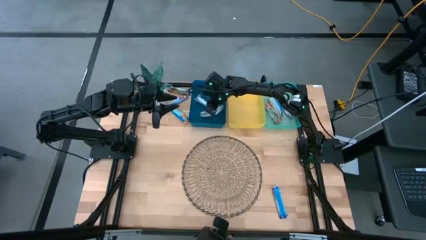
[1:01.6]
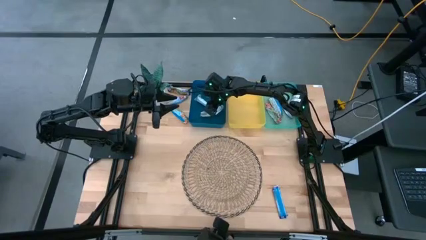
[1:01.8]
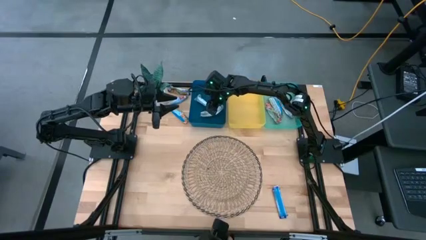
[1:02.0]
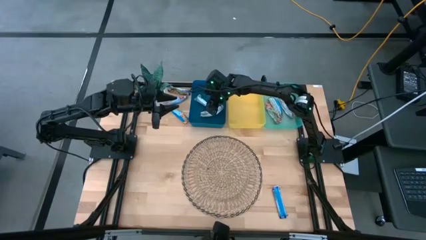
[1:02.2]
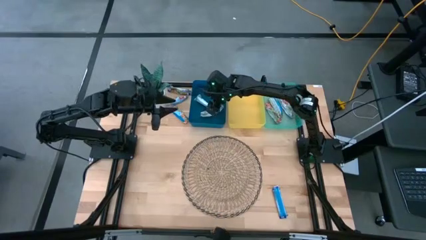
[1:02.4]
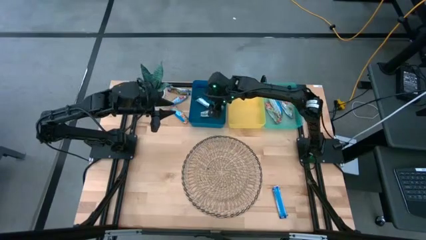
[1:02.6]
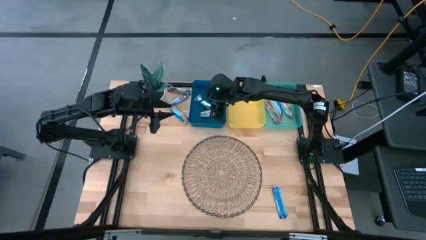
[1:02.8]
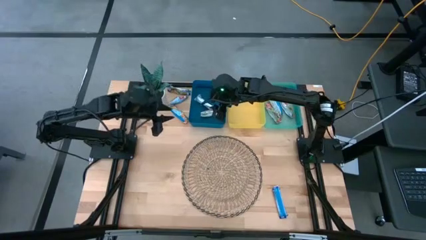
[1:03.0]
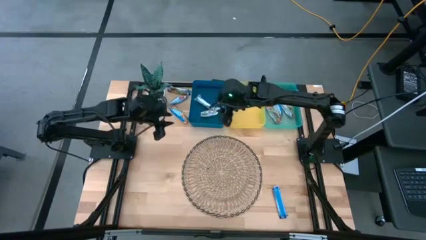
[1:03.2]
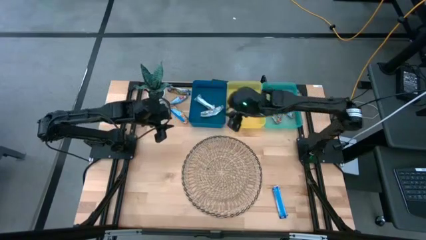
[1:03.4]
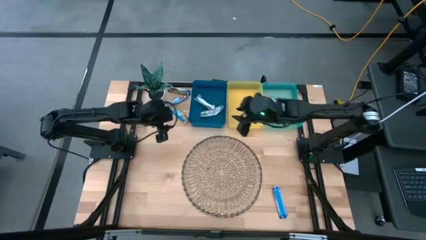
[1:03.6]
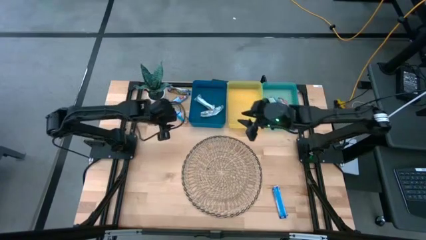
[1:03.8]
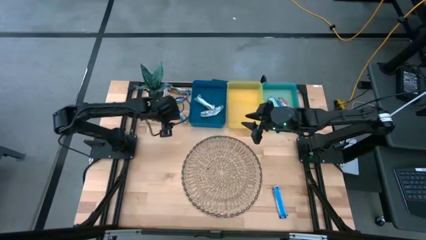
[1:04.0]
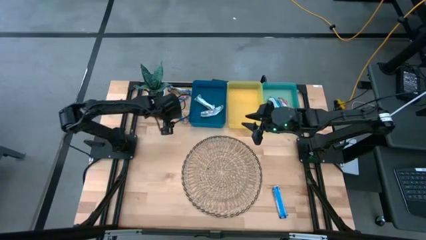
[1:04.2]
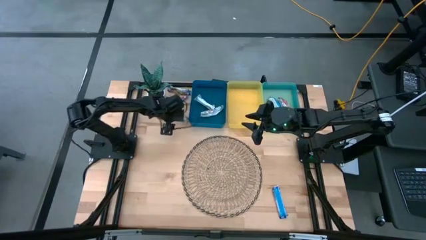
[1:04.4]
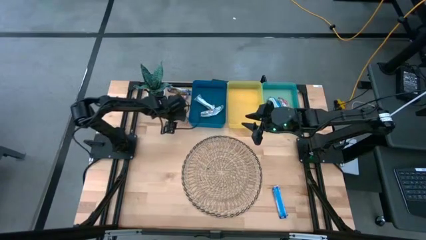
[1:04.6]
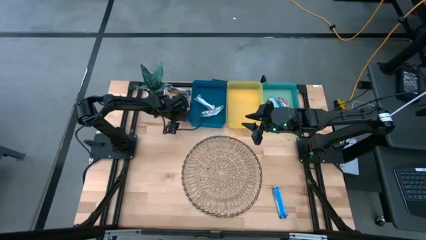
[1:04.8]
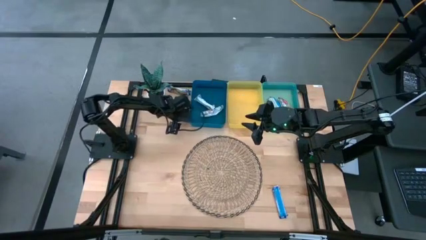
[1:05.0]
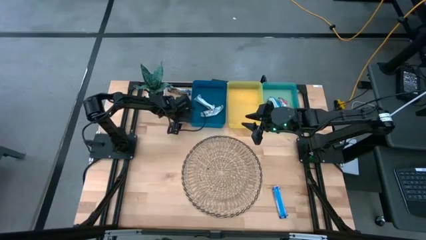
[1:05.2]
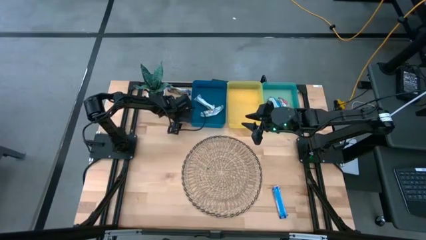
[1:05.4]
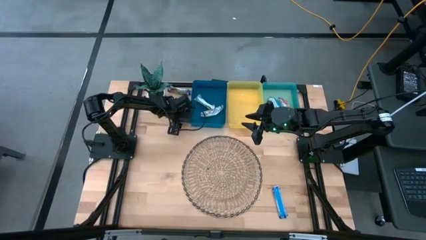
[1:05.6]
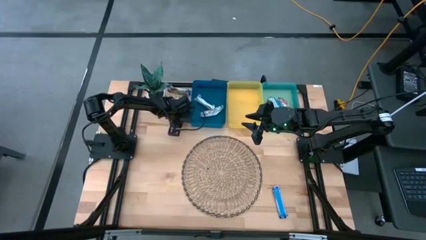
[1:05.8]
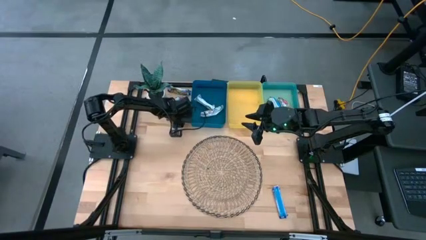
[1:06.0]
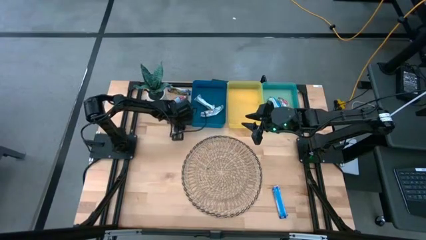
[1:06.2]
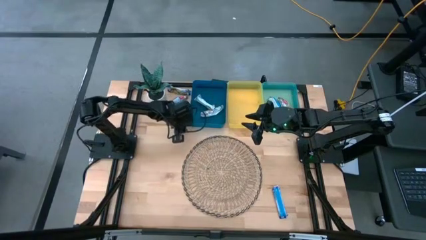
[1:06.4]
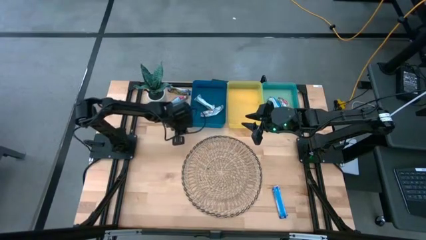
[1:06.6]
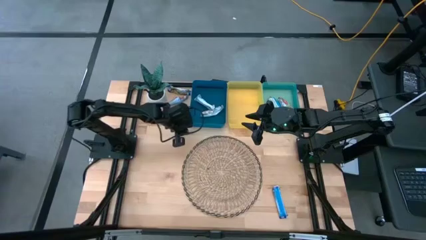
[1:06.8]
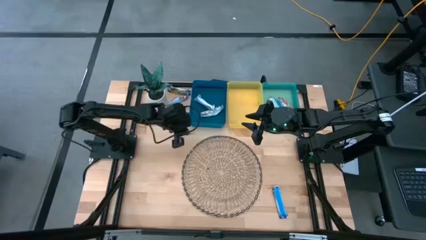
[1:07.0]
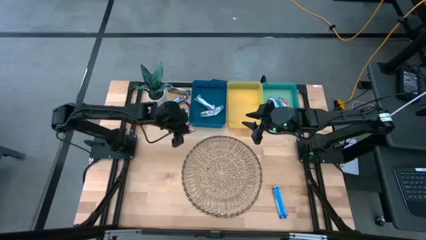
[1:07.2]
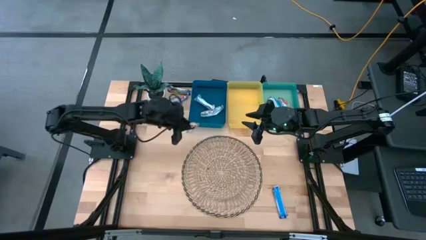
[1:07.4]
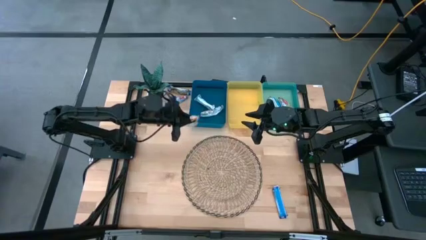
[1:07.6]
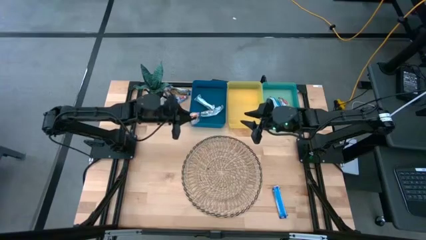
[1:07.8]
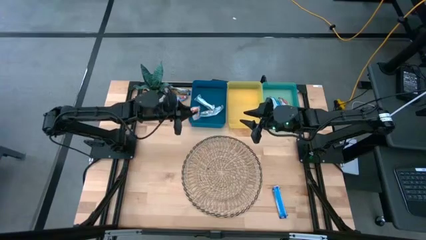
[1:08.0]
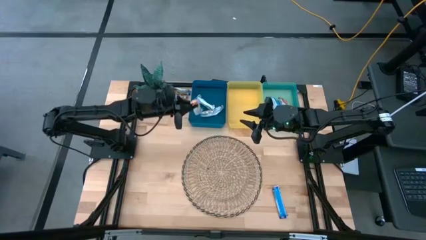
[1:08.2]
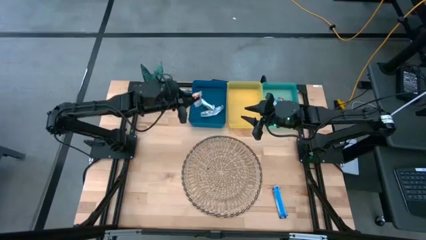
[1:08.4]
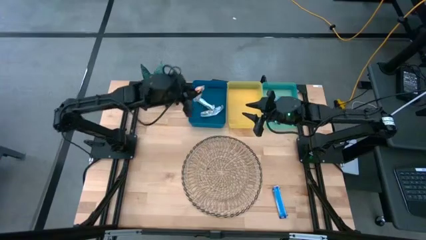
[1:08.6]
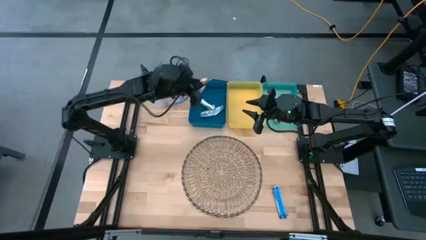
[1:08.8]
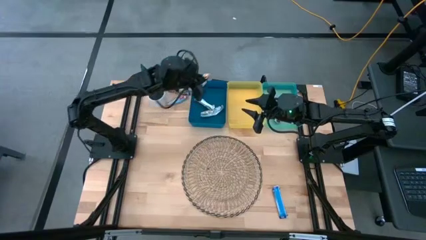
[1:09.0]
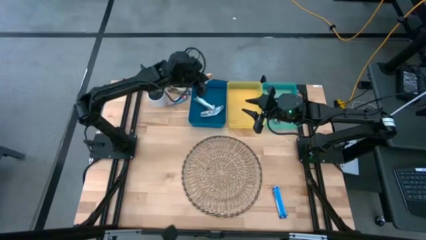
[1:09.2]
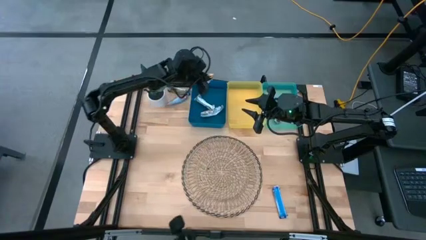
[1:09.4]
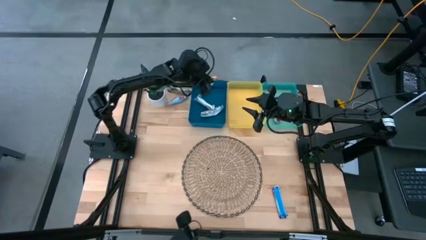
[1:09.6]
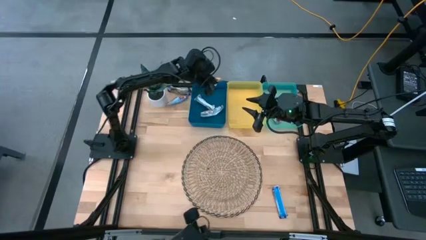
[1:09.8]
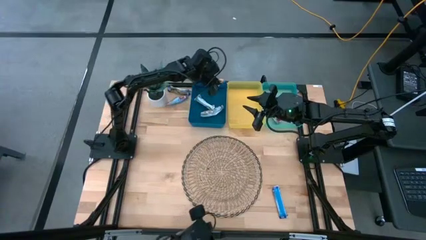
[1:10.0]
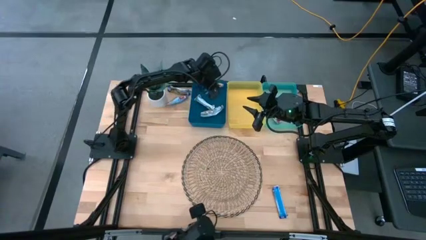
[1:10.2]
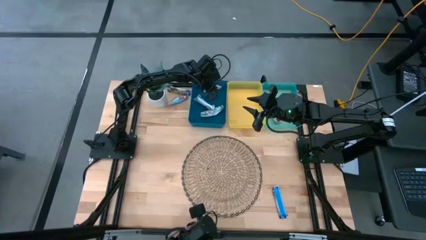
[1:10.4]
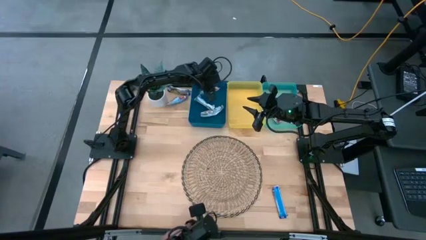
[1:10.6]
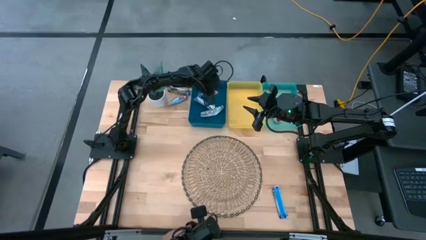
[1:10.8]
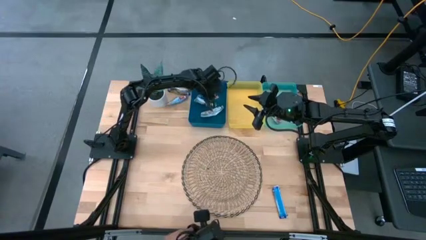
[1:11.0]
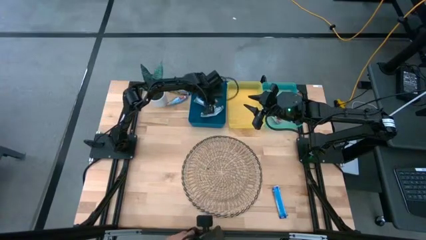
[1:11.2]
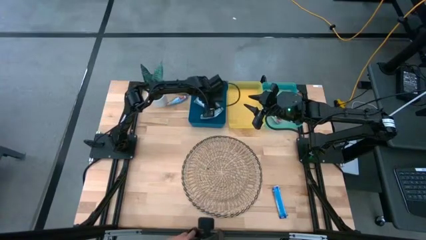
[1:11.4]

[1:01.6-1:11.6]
Task: Pick and place Granola Bars by type
Put the yellow granola bar into the blue bin

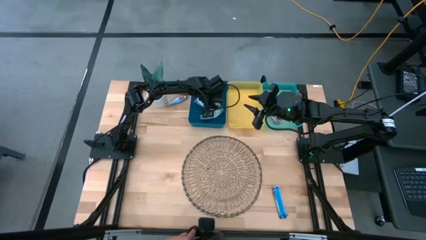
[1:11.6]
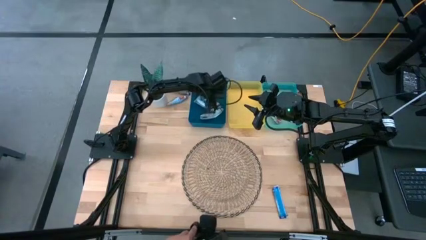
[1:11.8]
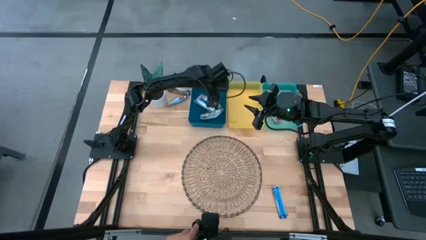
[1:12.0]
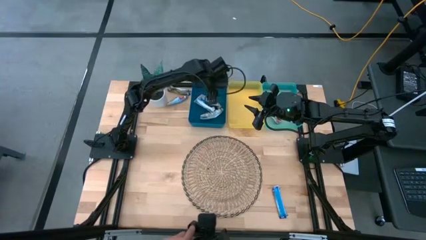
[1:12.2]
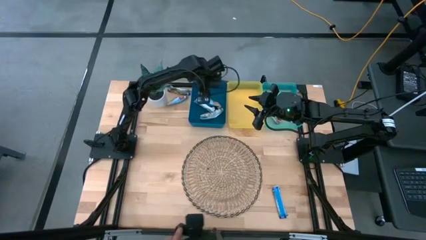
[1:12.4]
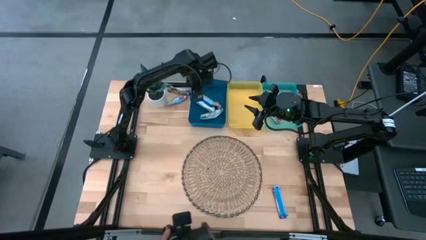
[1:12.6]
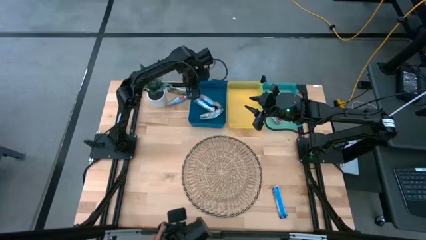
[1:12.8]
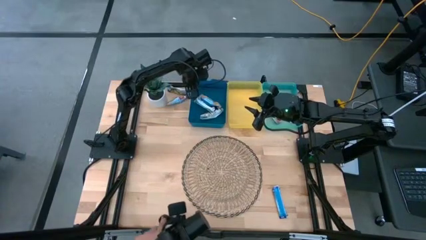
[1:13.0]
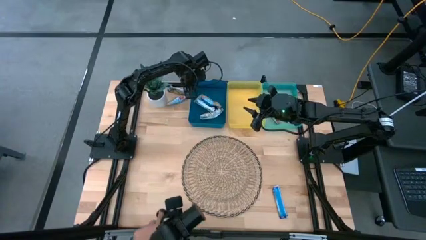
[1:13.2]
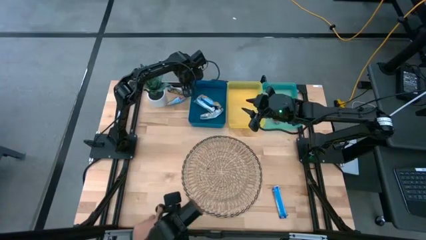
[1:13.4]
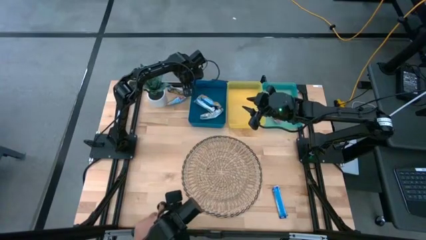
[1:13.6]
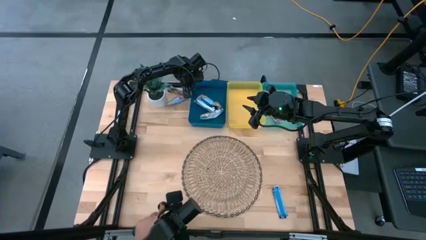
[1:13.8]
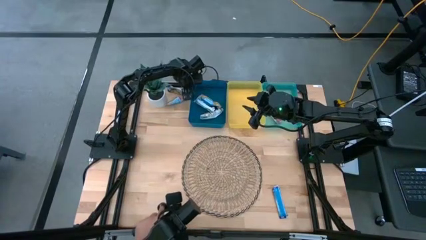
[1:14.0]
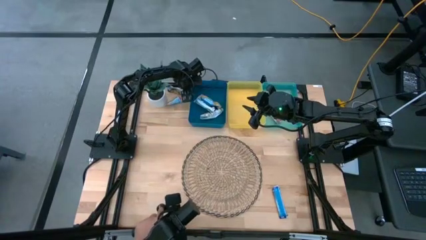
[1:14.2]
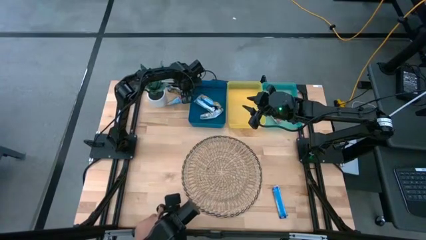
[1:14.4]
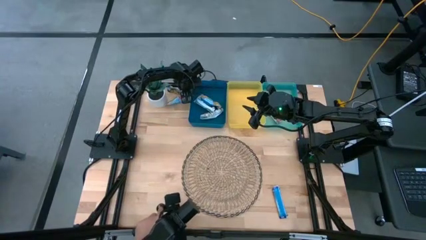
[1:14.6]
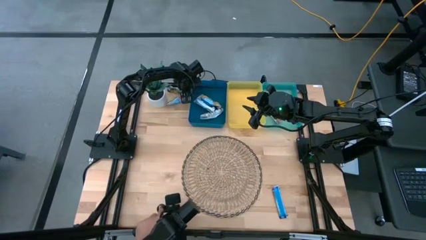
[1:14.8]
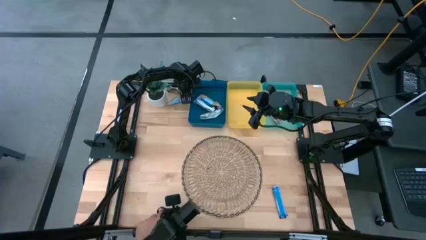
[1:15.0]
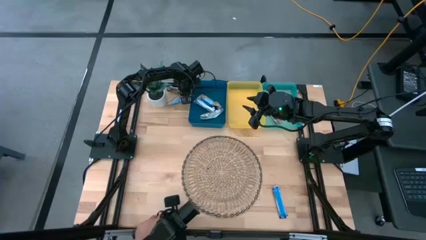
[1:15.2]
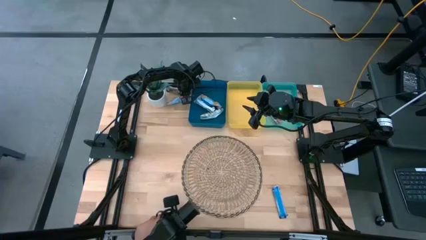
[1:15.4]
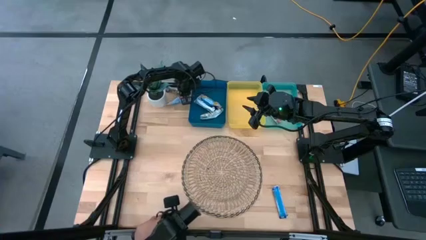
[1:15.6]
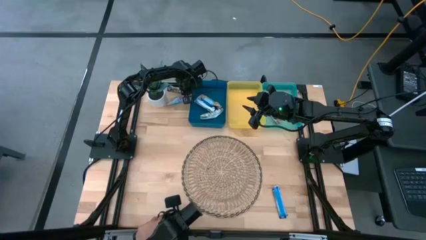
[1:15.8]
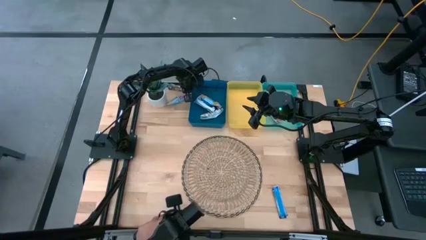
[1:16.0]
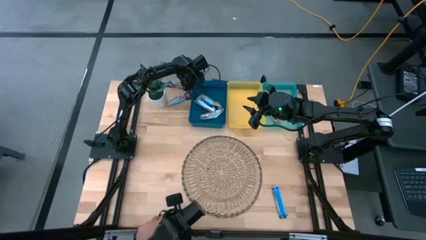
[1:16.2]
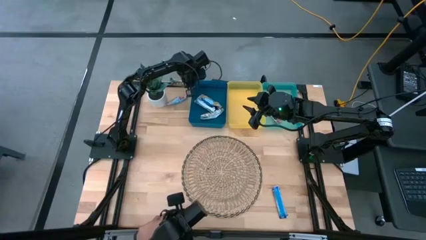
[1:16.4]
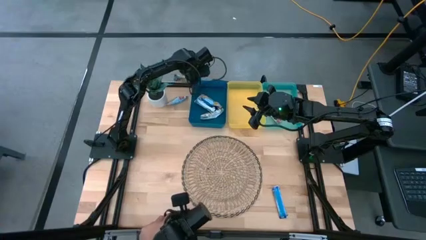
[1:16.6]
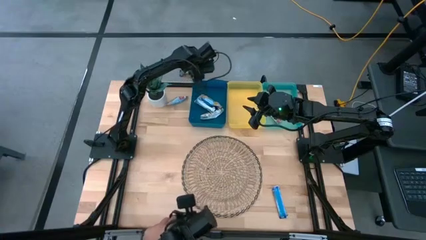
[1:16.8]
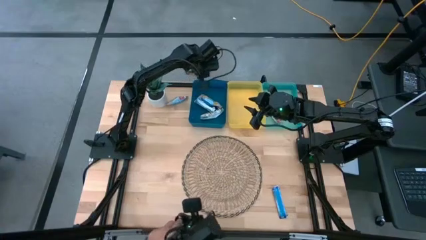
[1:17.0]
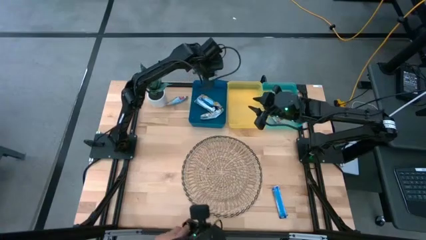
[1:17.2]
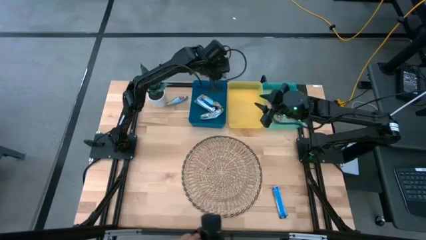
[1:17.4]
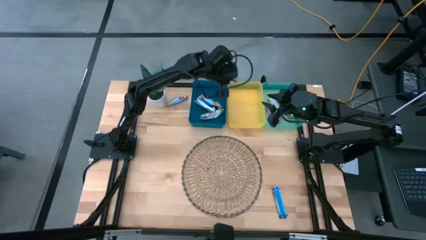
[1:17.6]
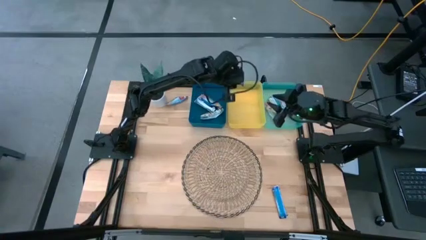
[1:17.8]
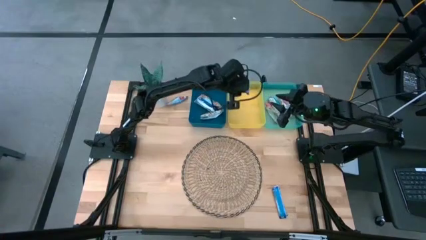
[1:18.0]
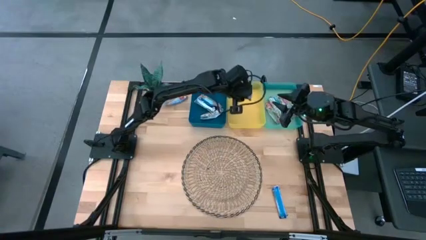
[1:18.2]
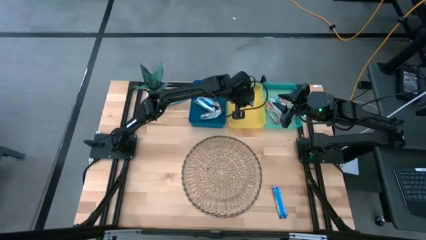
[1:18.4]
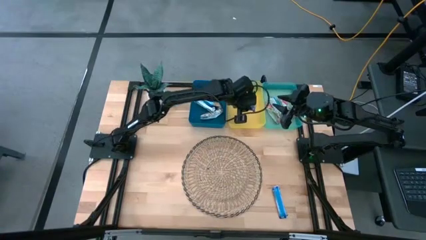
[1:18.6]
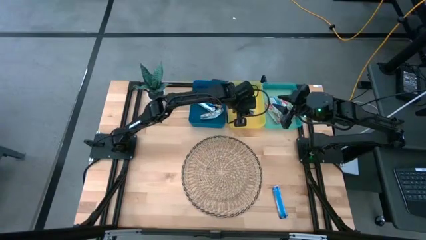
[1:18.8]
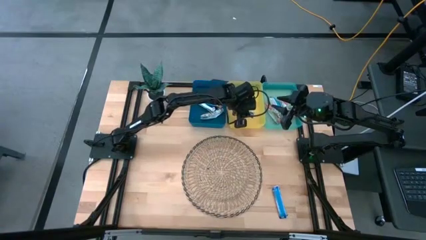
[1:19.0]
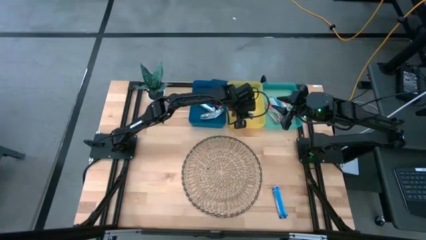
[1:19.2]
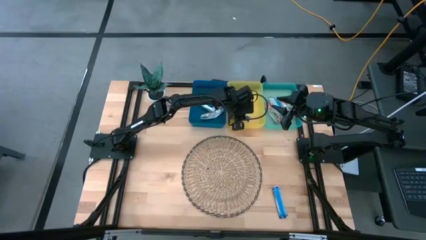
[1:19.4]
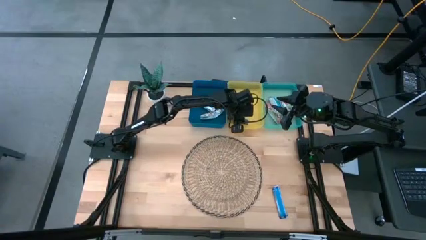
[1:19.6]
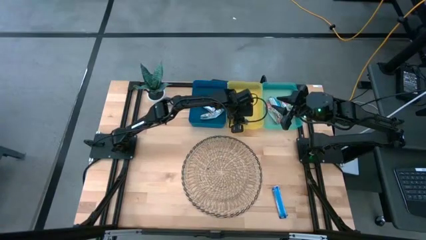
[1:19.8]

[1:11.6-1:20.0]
Put the blue granola bar into the yellow bin
